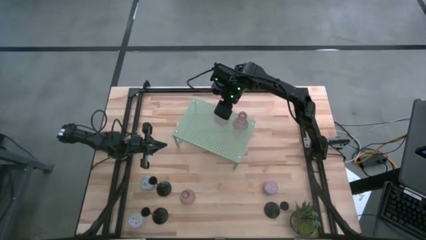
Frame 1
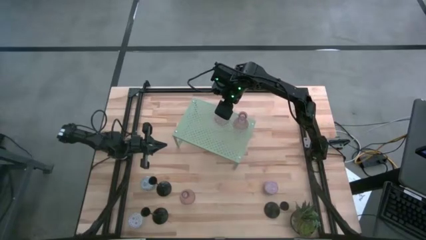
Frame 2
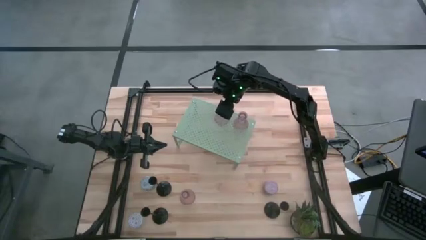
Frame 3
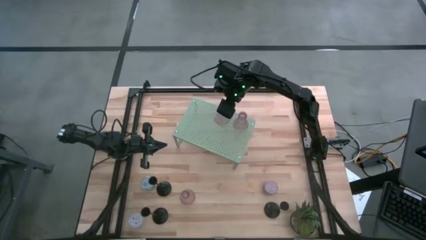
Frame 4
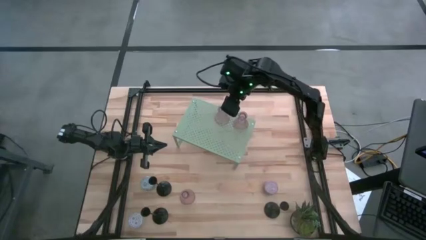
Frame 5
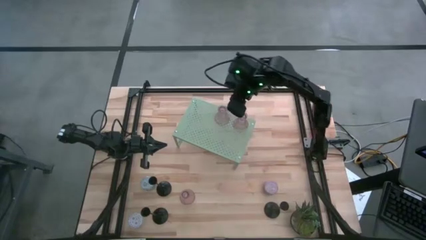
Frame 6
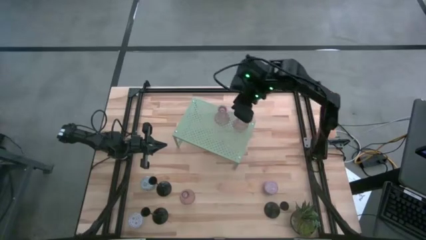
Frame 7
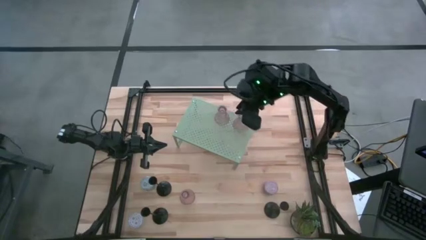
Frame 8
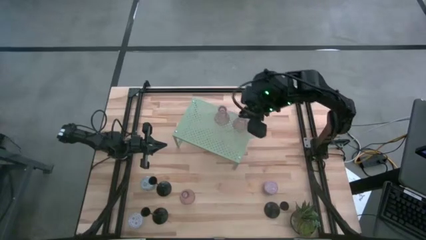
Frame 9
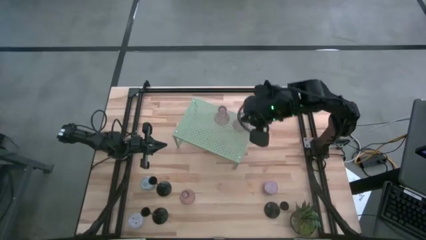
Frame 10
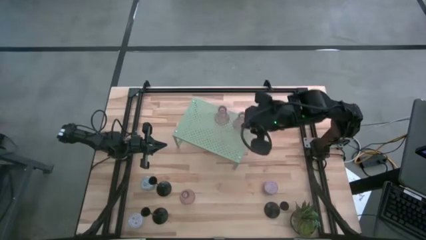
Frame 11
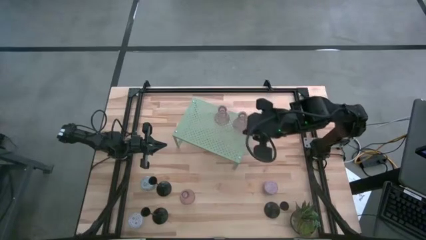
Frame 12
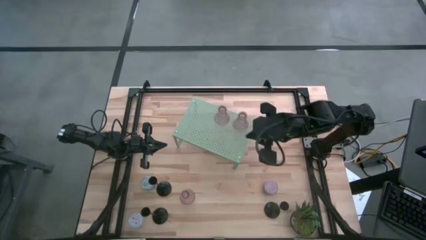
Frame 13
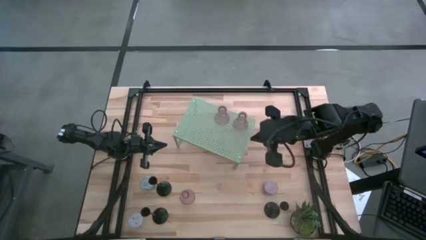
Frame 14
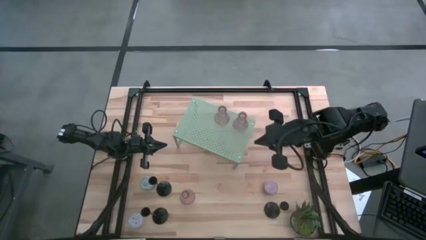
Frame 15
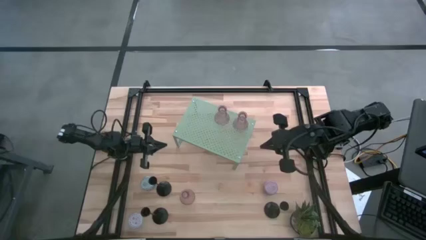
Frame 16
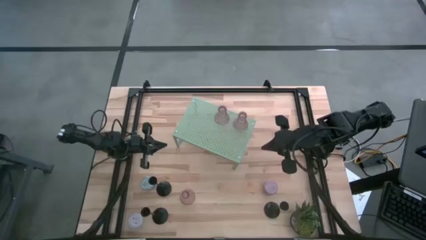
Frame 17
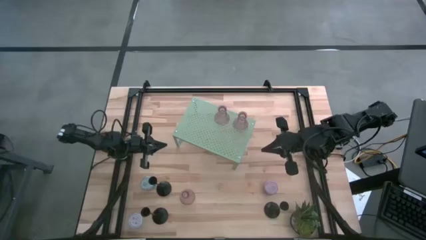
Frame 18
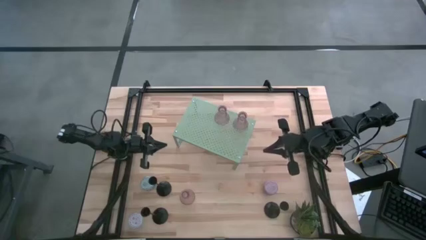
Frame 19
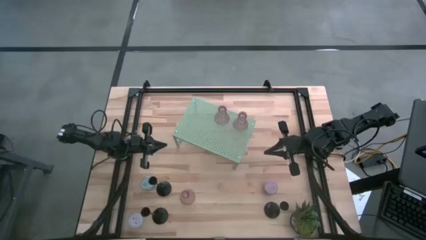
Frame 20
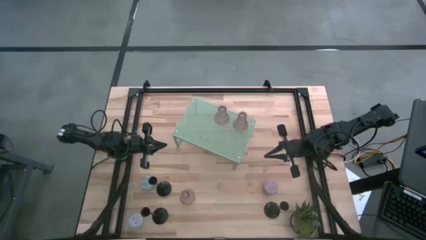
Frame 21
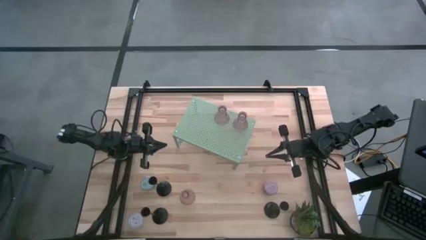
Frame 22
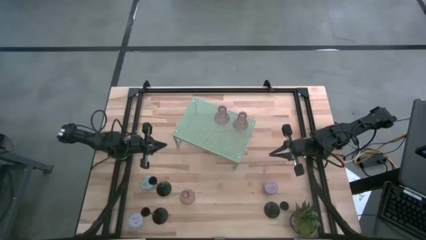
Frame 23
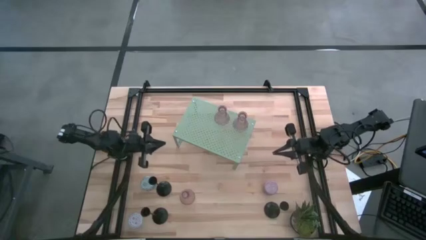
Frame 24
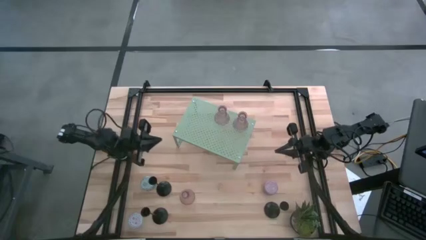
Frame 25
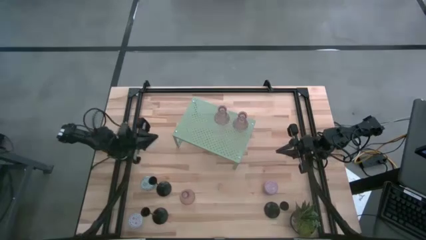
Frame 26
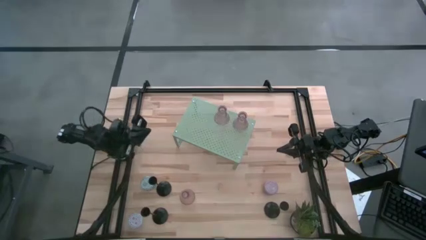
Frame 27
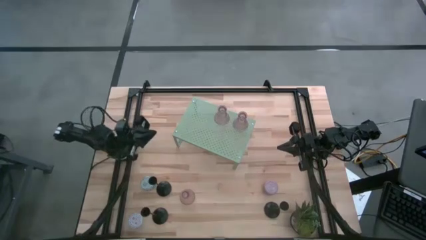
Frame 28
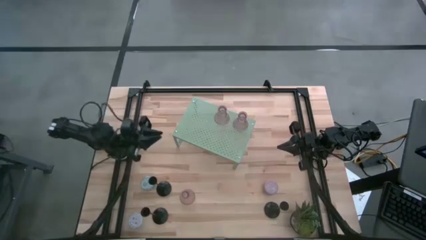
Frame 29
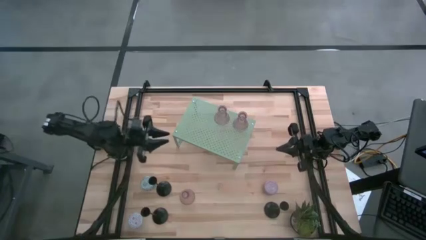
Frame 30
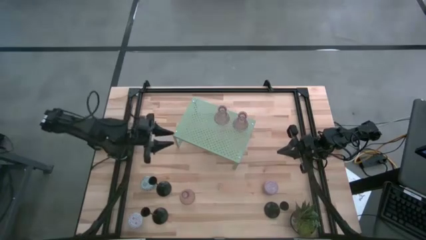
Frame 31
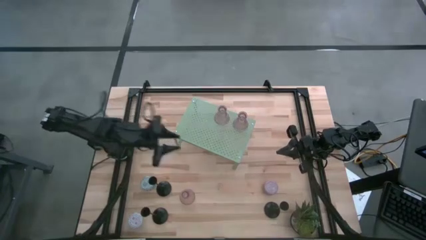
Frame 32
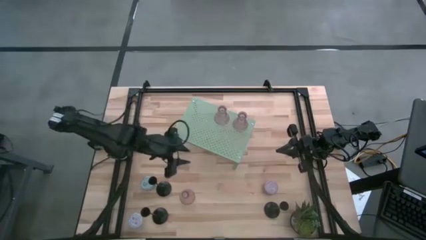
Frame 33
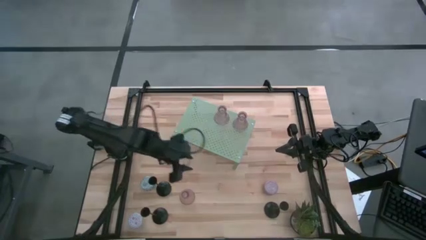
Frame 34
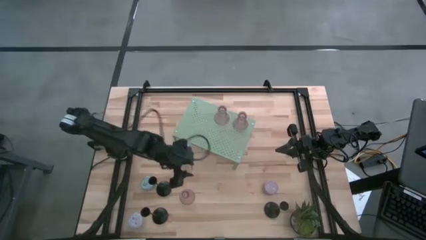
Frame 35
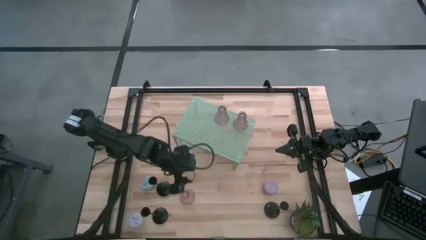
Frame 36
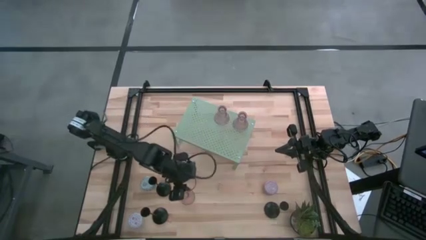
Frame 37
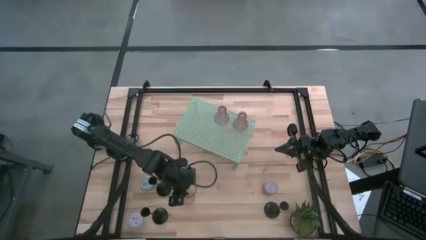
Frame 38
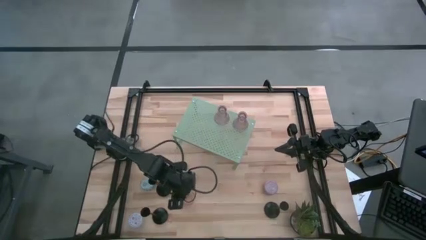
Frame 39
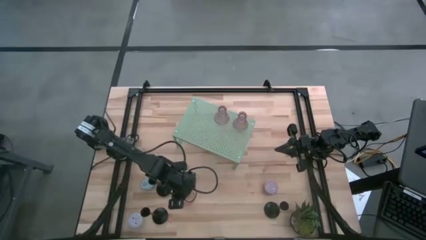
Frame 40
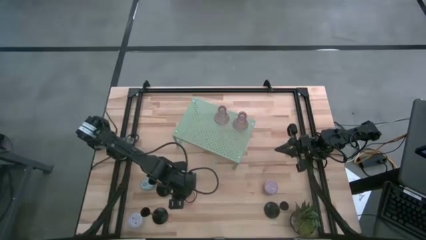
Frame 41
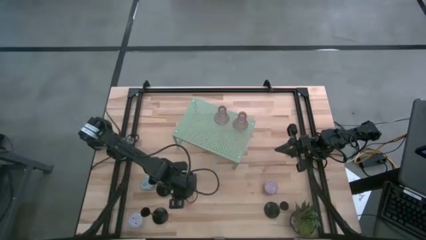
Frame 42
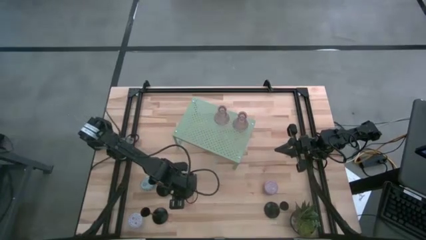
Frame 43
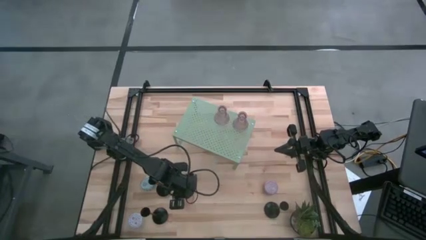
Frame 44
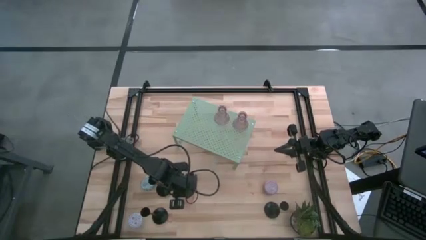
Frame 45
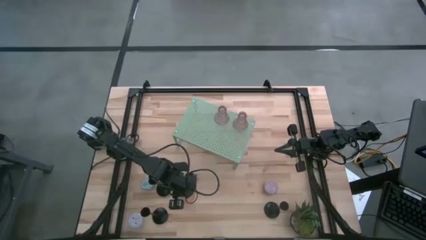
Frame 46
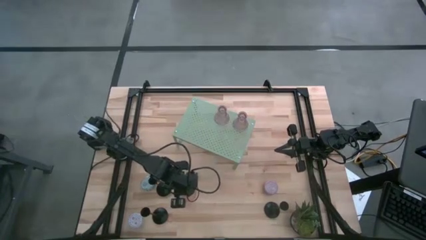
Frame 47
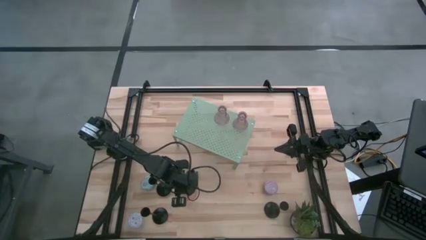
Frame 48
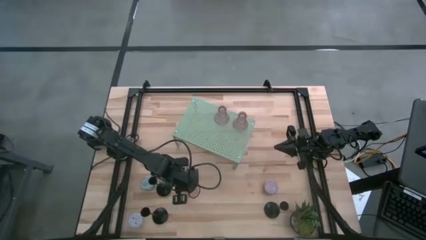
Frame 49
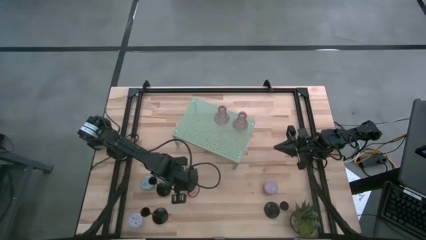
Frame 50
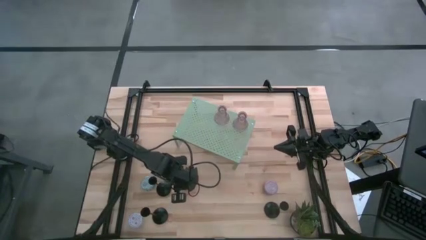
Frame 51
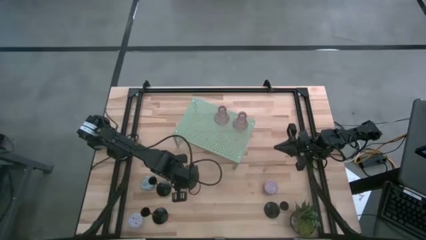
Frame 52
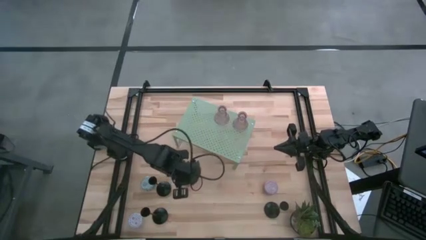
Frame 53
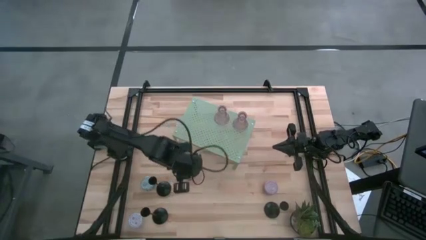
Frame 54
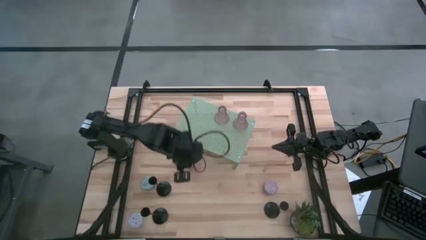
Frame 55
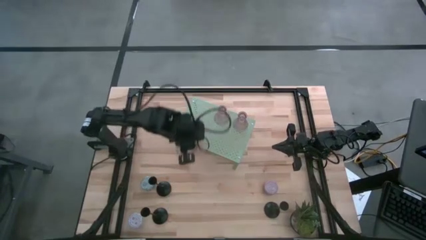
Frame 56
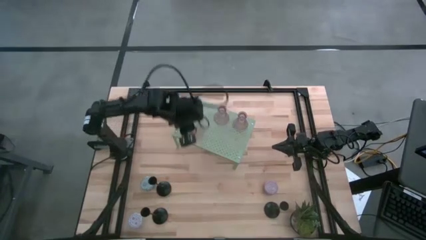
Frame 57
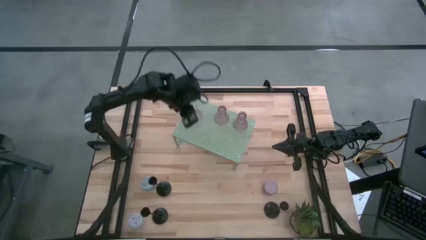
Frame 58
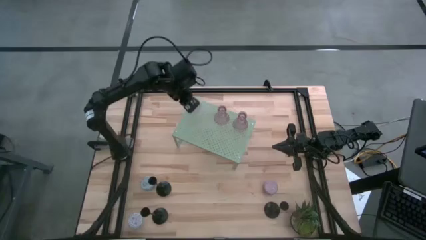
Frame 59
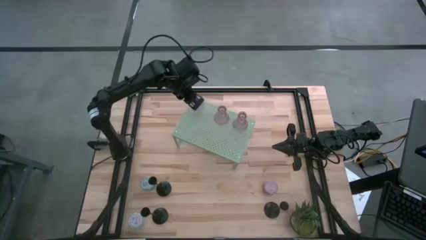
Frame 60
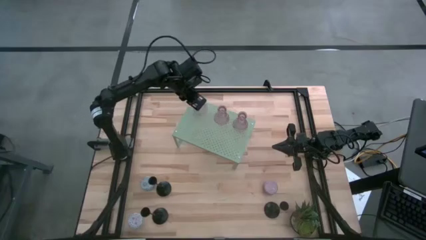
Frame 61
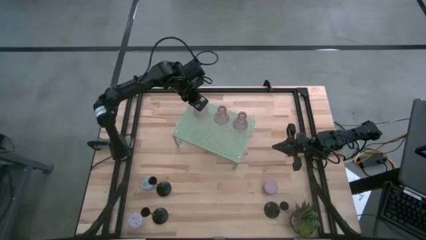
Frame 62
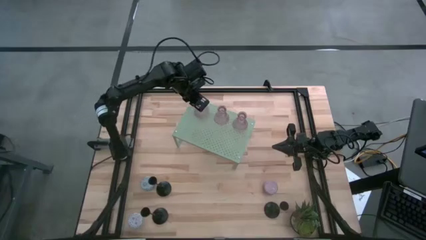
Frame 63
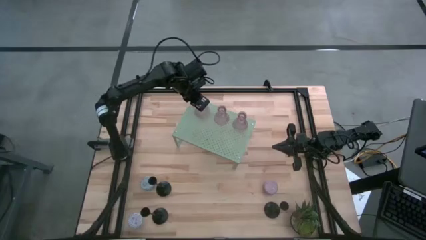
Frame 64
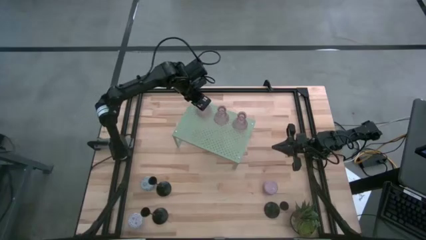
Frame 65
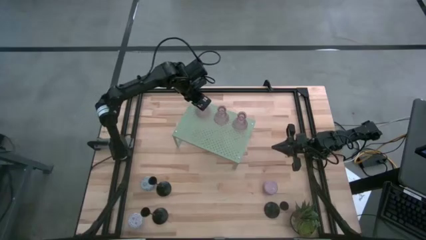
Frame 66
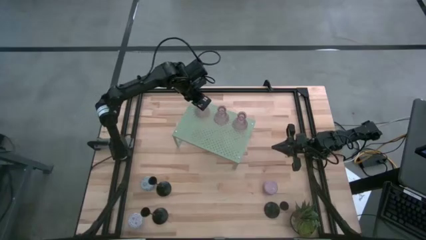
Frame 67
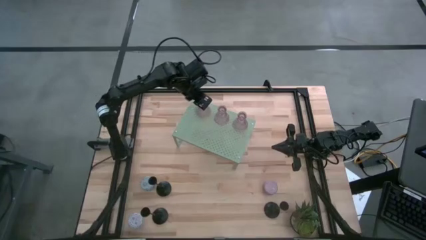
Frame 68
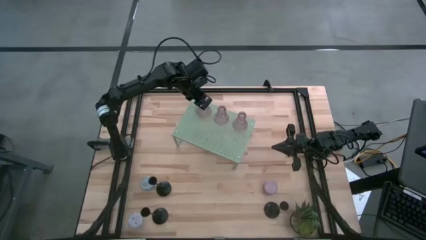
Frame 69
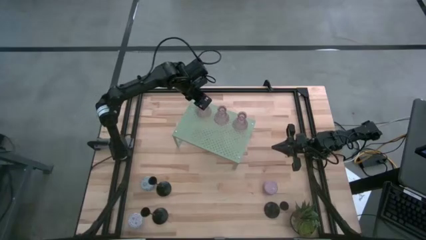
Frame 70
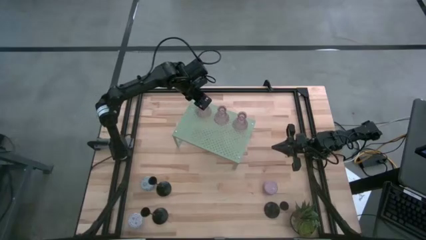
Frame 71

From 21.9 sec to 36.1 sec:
Task: Pick & Place candle stick holders
Put the purple candle holder on the shelf aligned with the other purple candle holder
